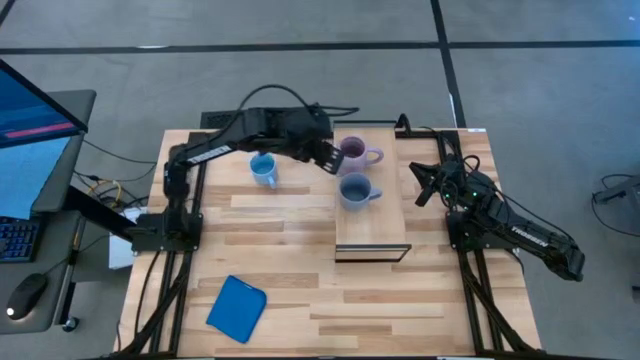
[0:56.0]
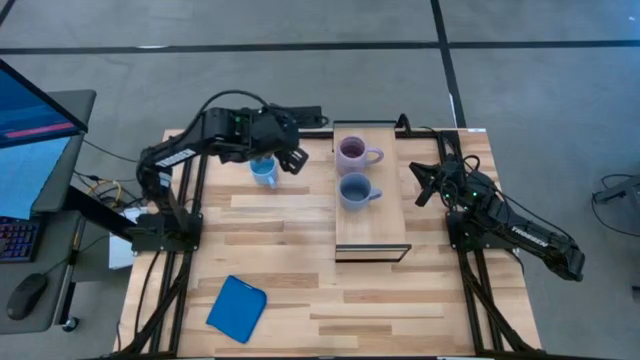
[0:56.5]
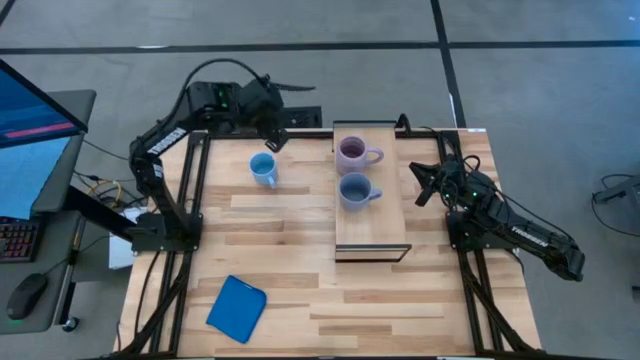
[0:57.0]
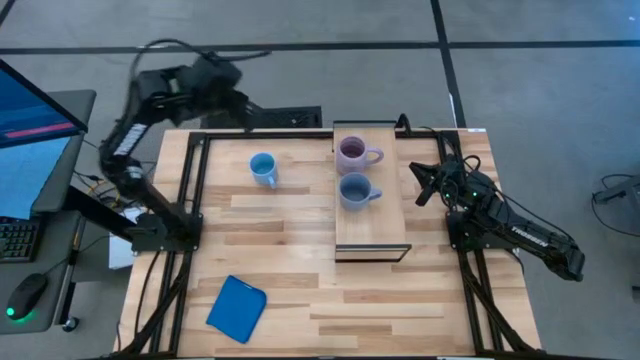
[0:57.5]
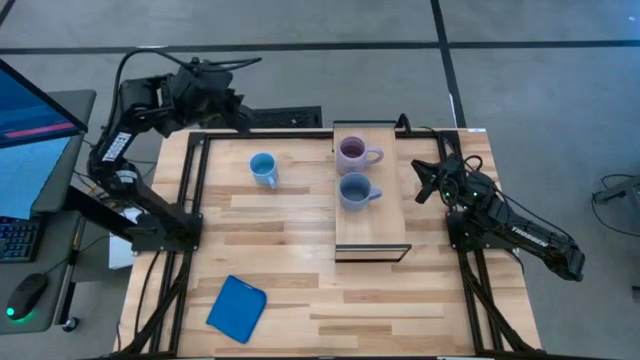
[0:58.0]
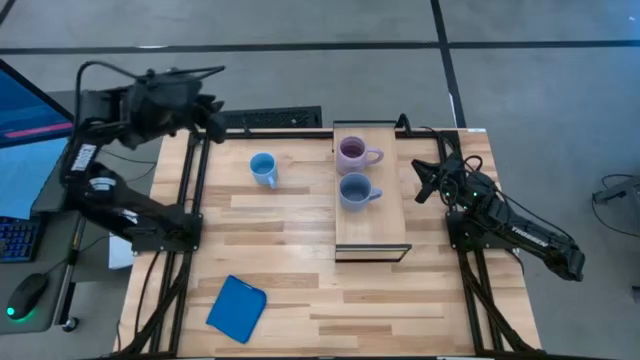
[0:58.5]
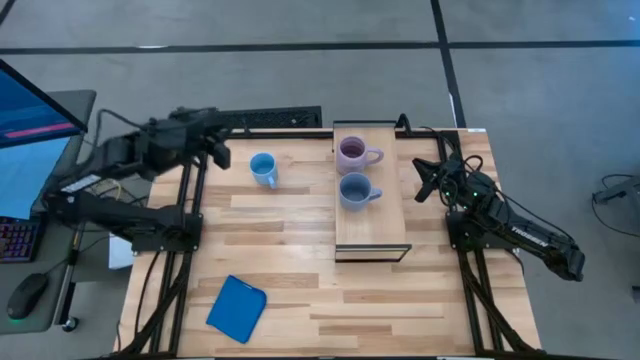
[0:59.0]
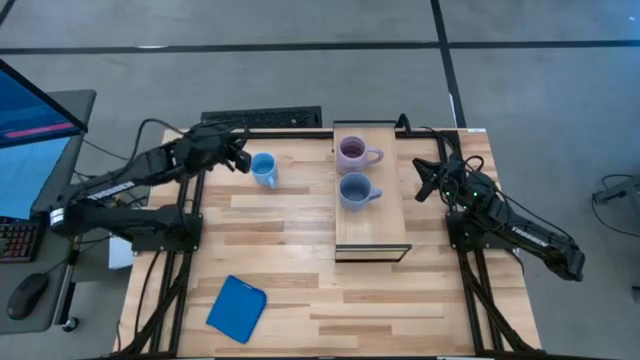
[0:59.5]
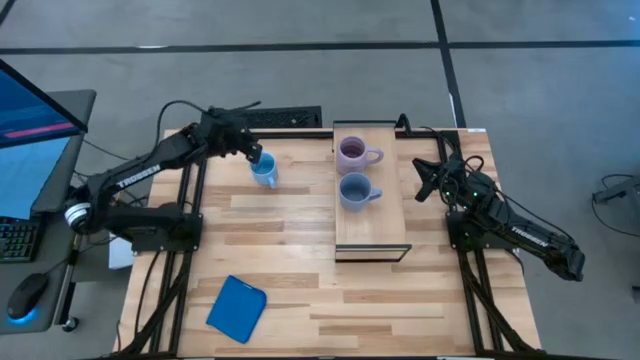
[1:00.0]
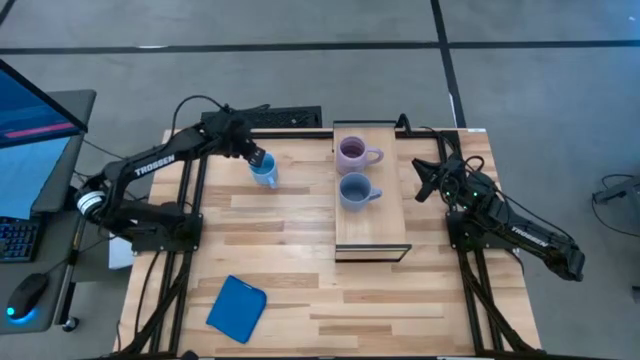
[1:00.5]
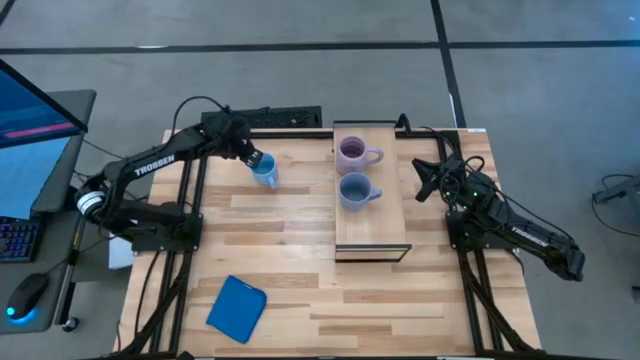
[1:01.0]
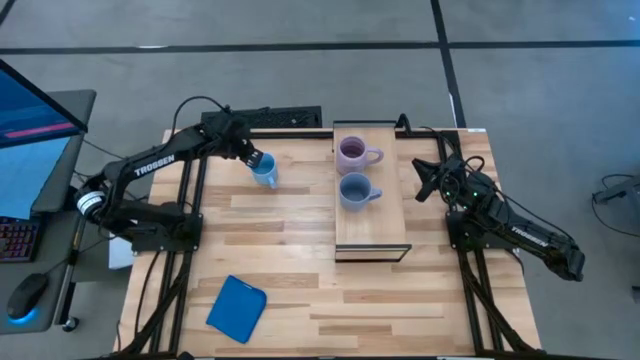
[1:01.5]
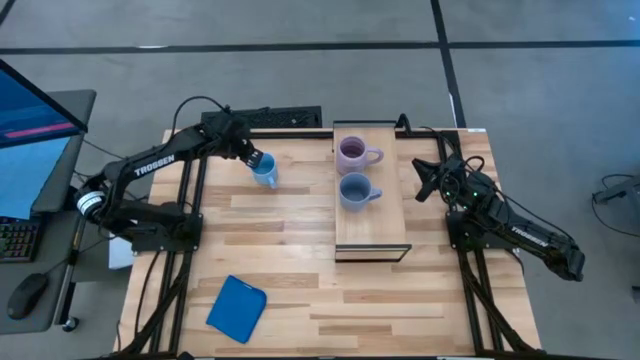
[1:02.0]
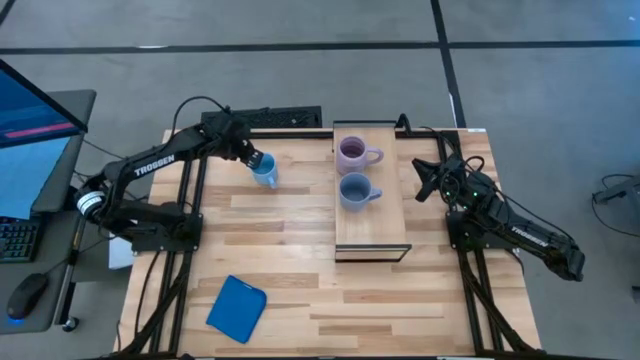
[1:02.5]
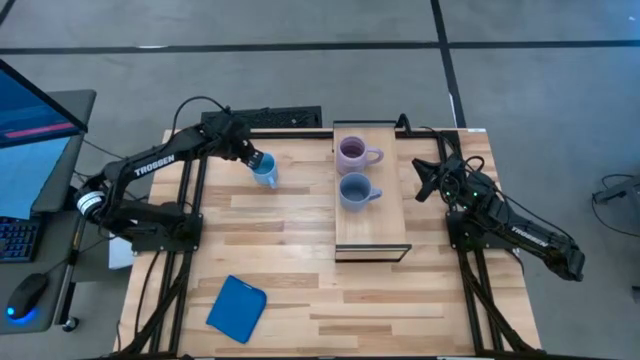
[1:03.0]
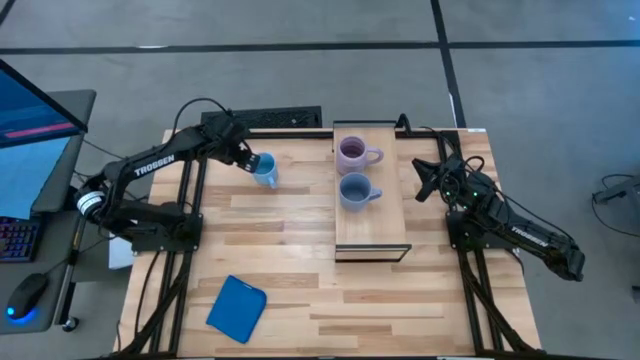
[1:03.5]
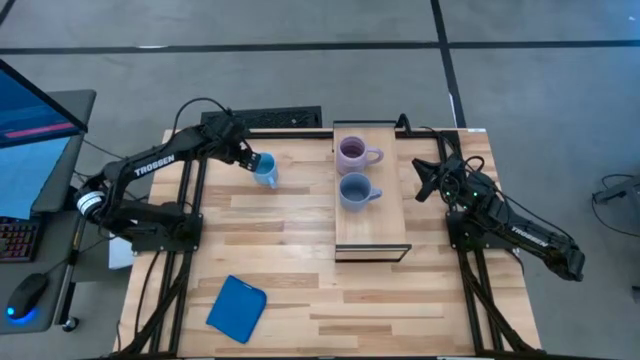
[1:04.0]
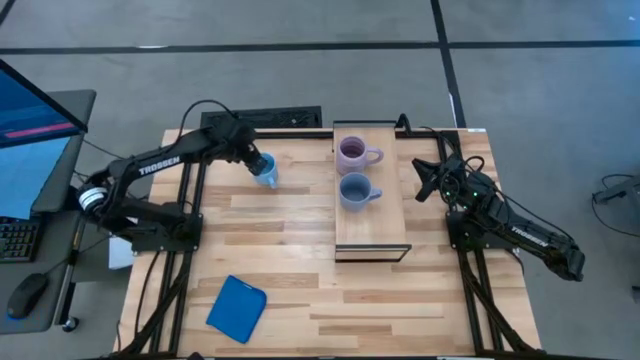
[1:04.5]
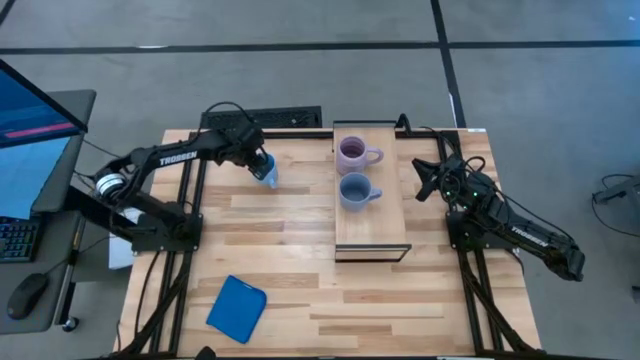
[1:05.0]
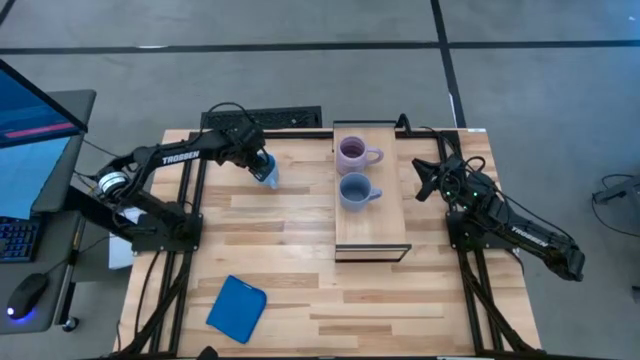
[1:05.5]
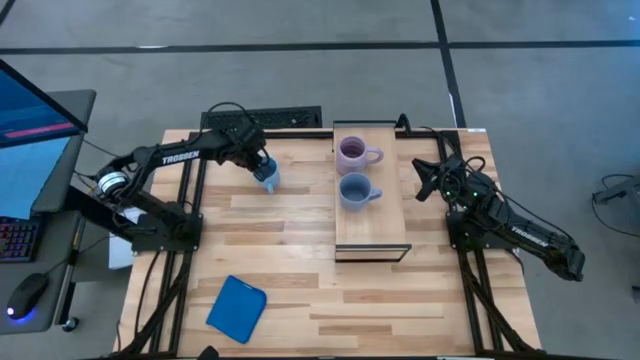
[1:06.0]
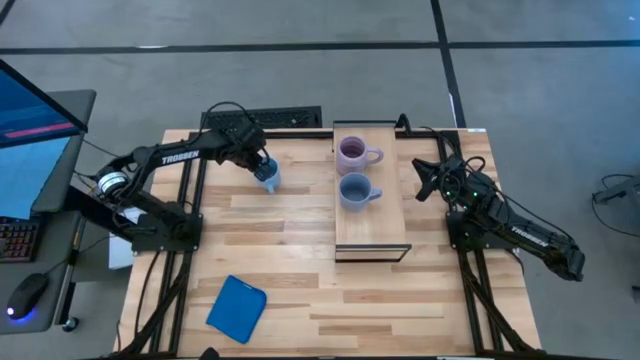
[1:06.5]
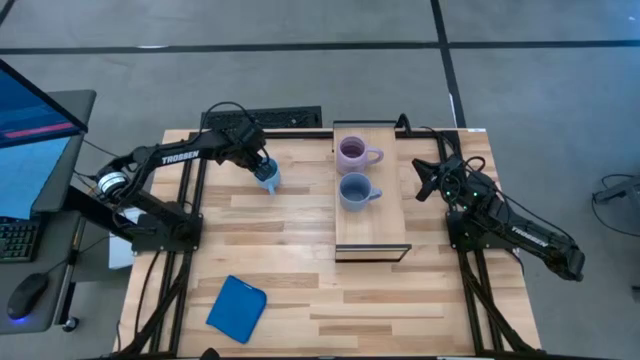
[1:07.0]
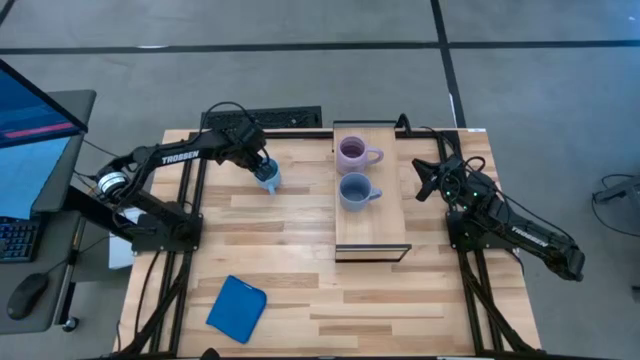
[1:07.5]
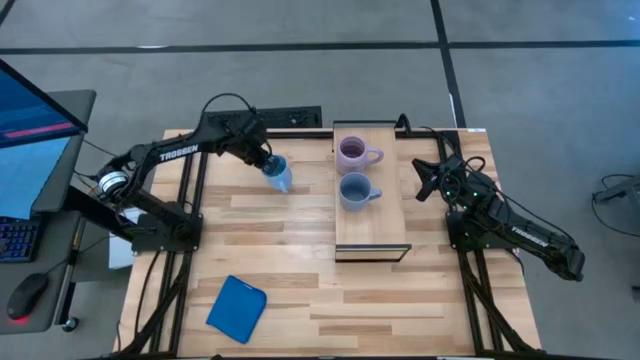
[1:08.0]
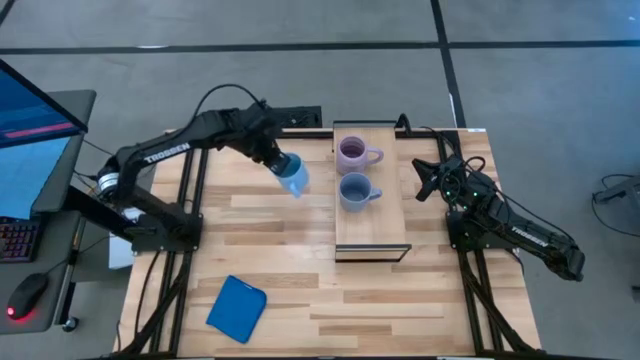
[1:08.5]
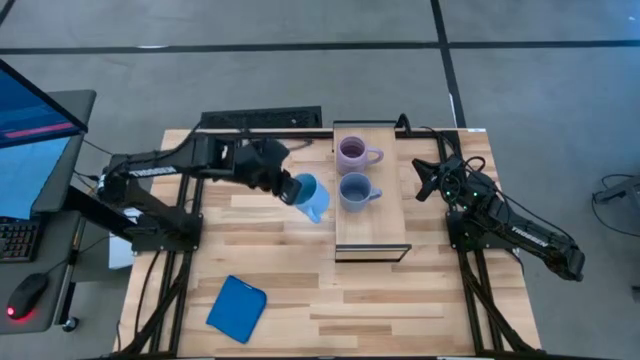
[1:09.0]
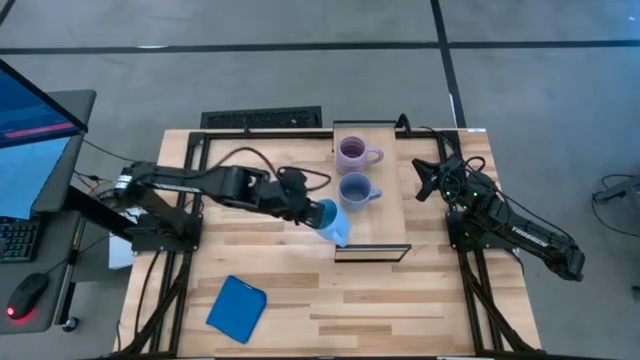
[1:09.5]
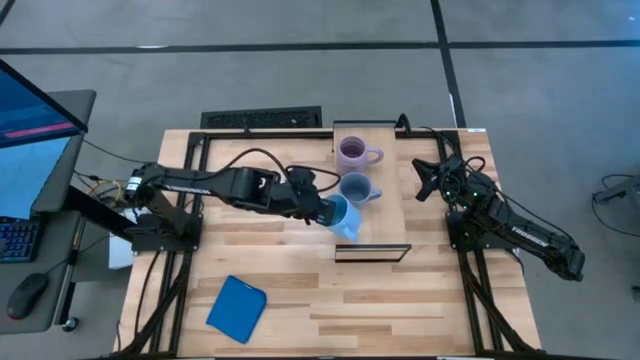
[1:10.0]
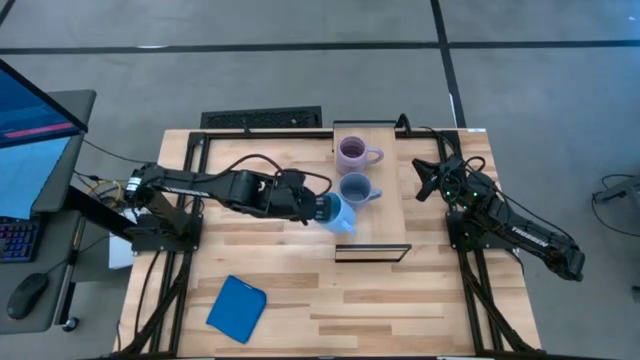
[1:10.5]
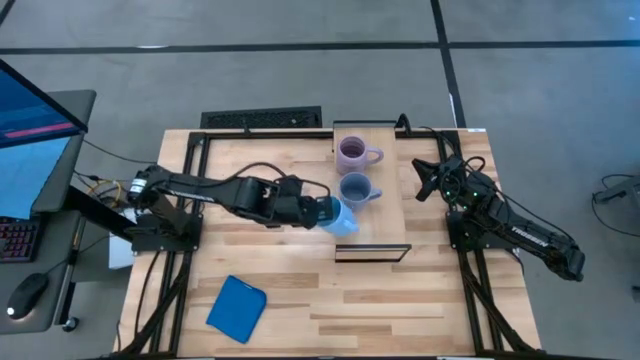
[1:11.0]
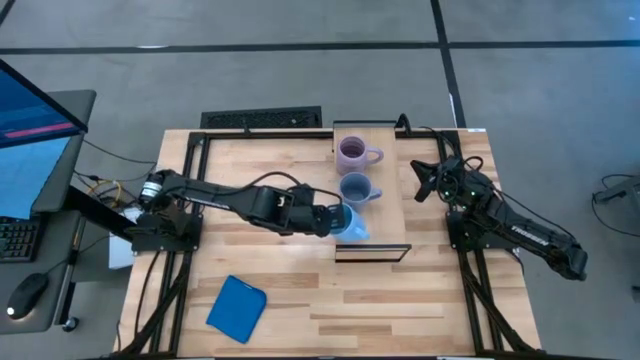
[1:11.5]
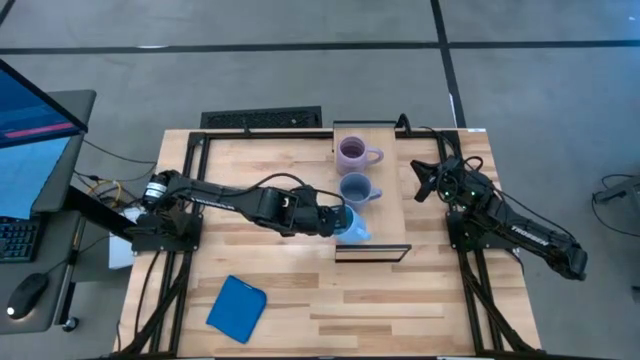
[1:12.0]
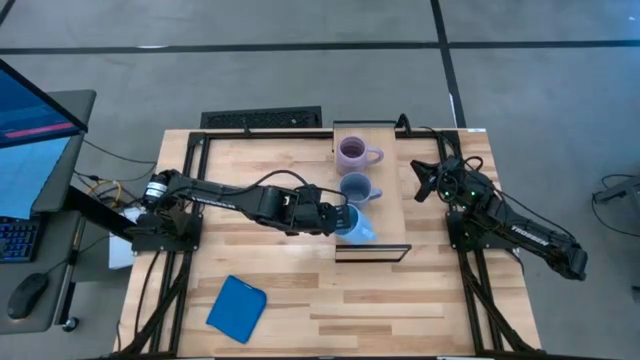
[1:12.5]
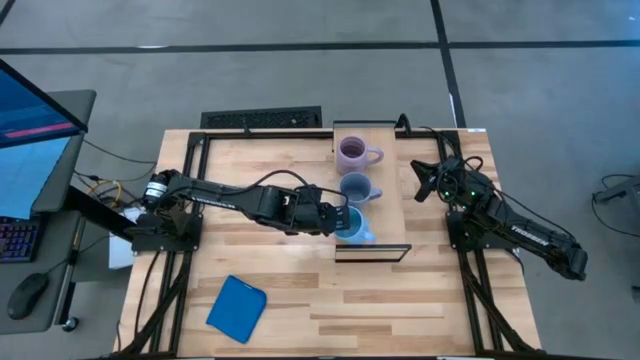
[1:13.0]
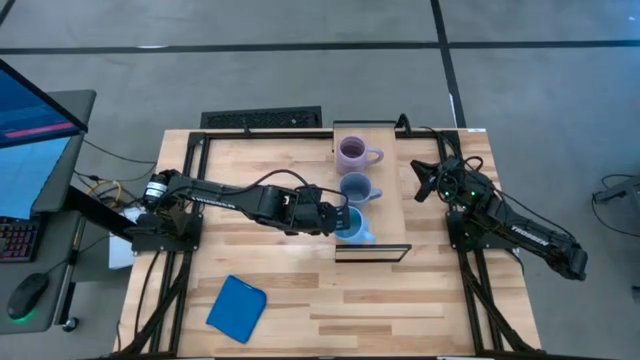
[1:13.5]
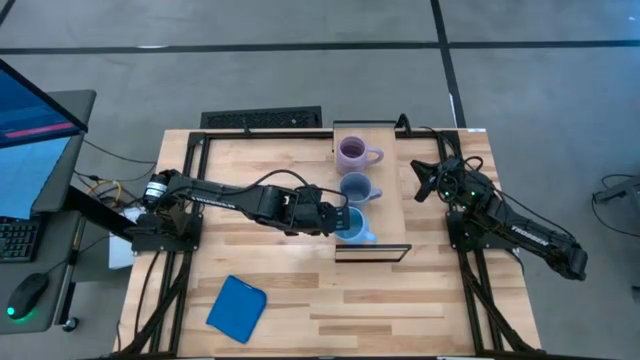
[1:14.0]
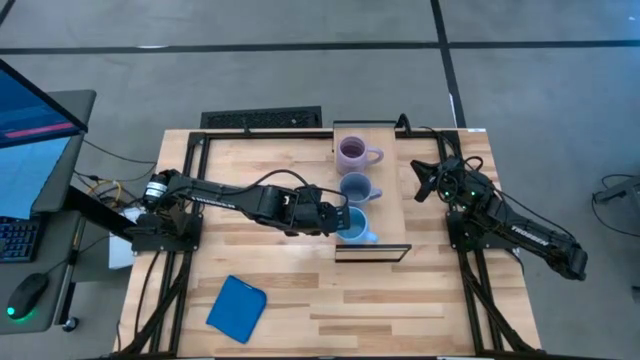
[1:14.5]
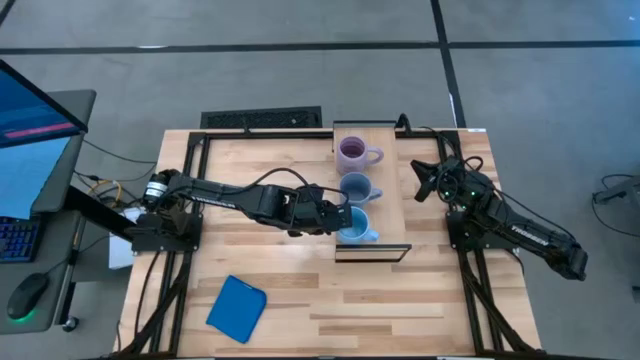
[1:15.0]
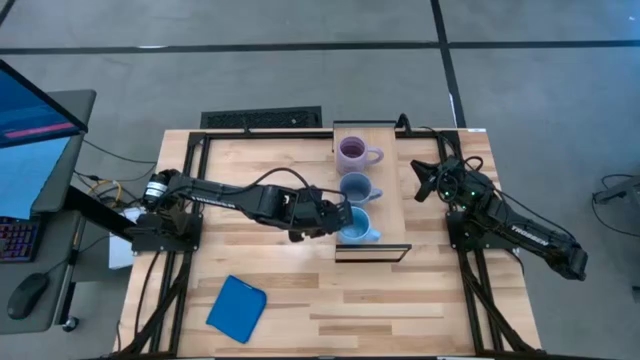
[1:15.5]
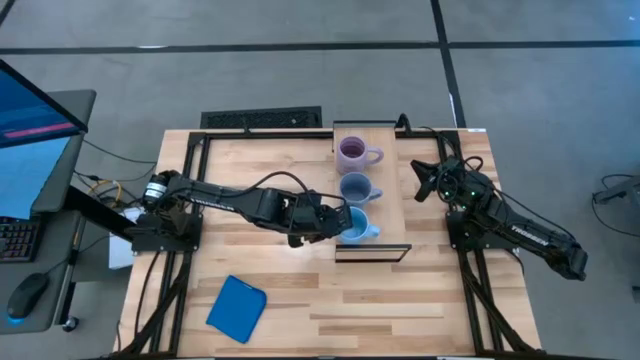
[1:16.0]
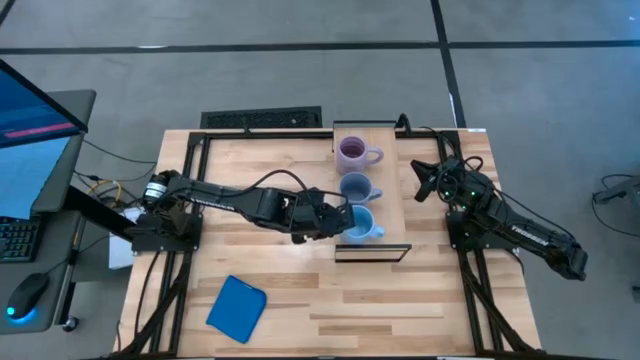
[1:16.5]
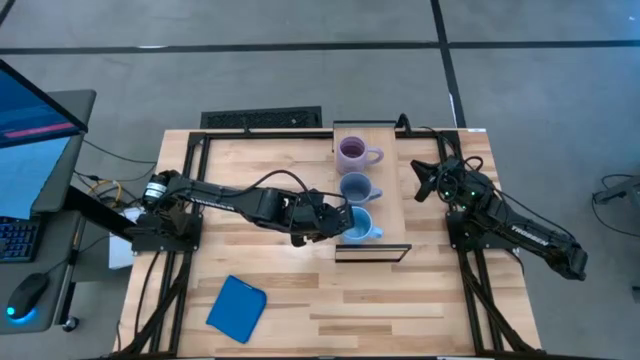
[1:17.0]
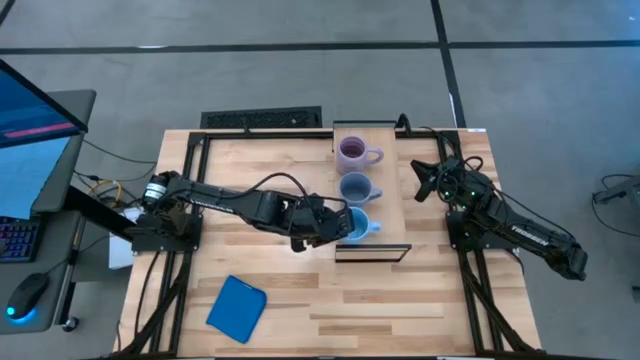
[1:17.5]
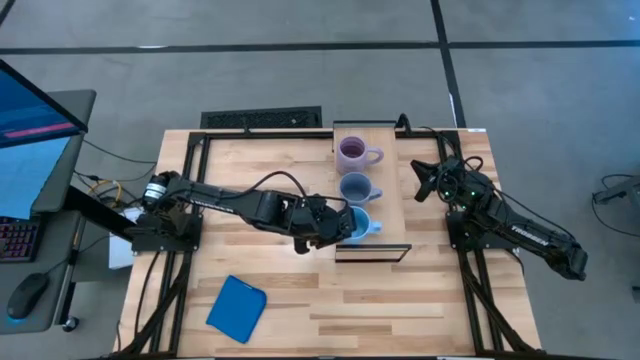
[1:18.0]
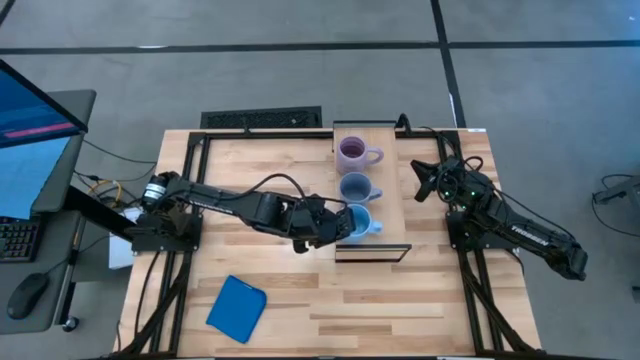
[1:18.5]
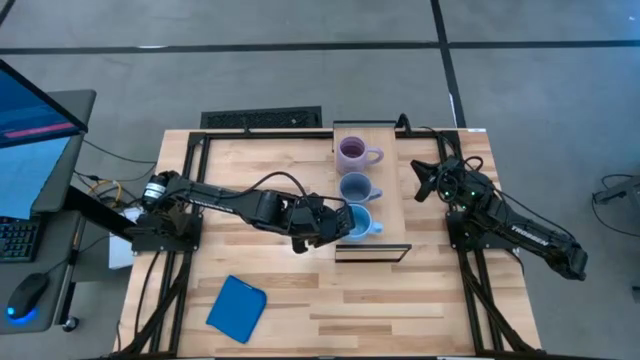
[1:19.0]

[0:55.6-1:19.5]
Task: Stack small to large cups/mugs on shelf
Put the light blue mug on the shelf
